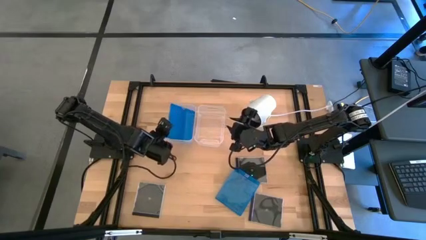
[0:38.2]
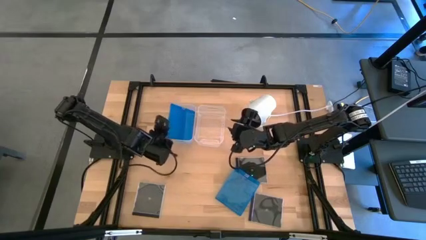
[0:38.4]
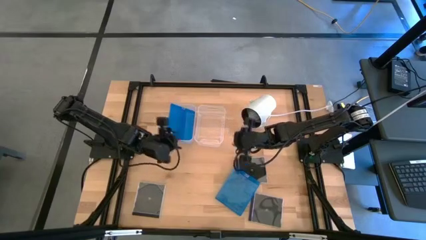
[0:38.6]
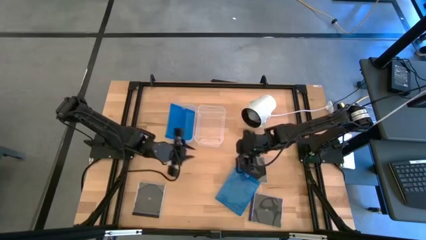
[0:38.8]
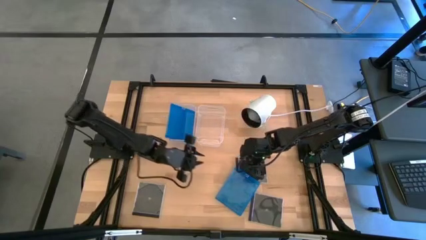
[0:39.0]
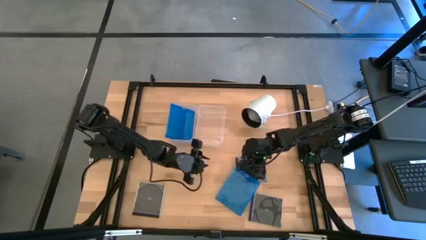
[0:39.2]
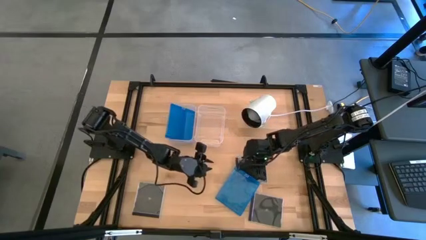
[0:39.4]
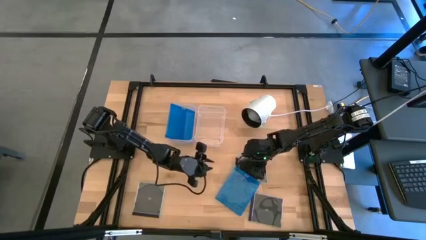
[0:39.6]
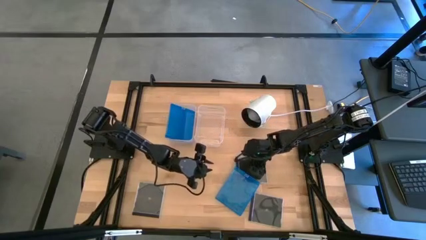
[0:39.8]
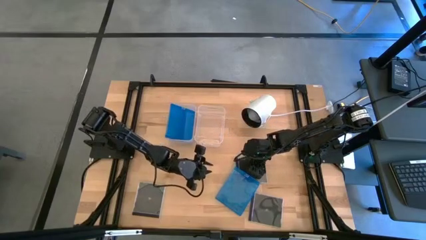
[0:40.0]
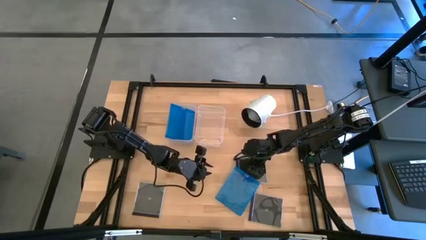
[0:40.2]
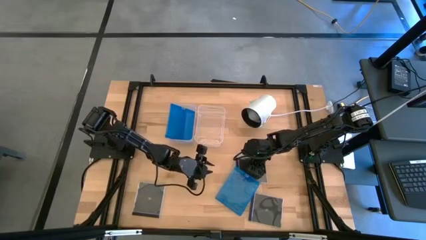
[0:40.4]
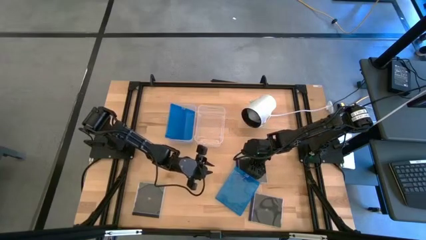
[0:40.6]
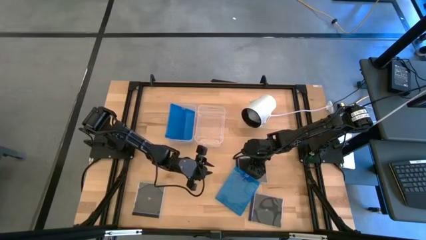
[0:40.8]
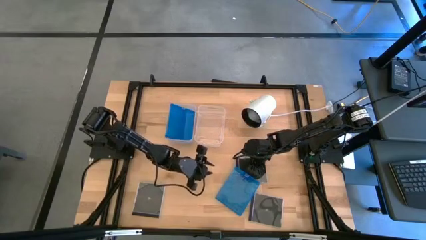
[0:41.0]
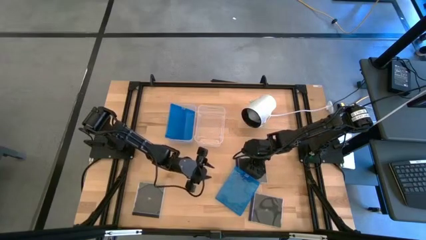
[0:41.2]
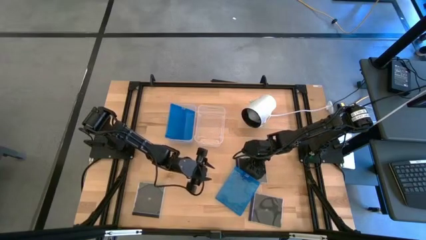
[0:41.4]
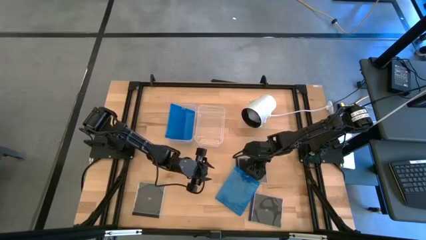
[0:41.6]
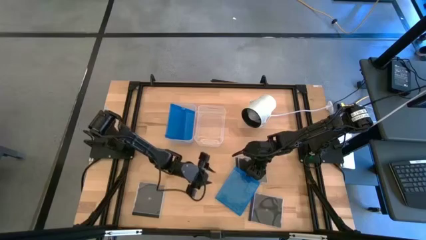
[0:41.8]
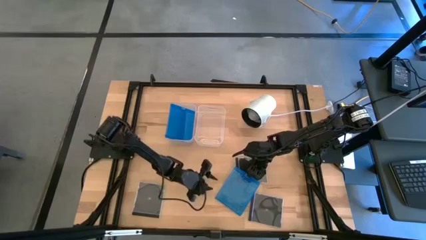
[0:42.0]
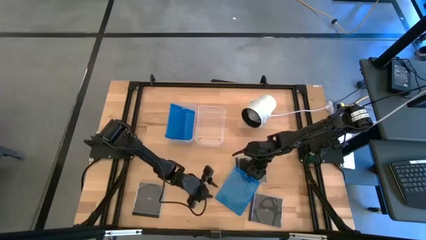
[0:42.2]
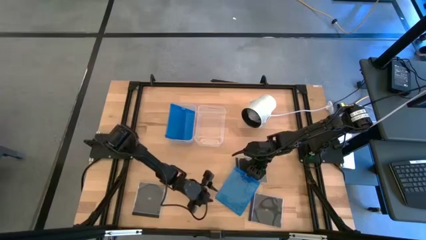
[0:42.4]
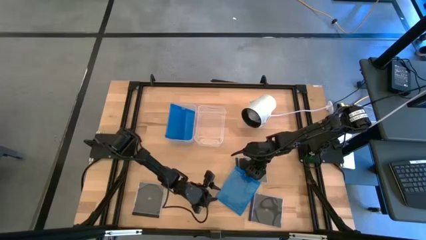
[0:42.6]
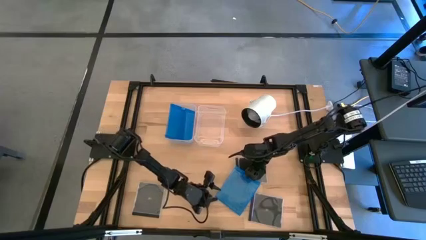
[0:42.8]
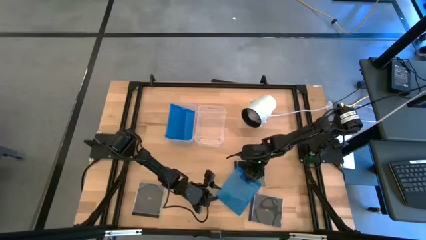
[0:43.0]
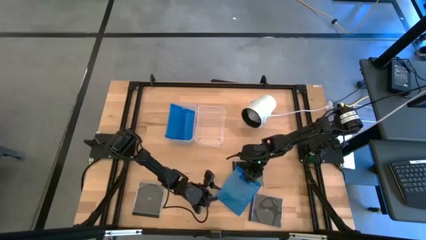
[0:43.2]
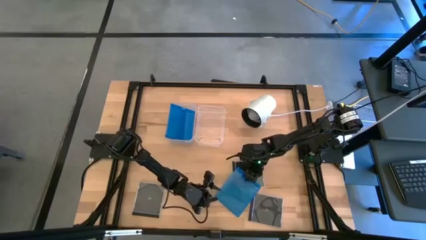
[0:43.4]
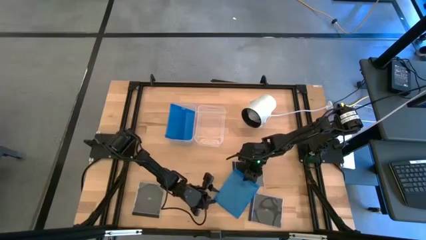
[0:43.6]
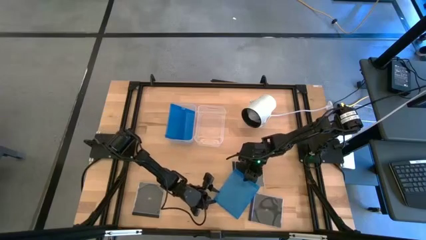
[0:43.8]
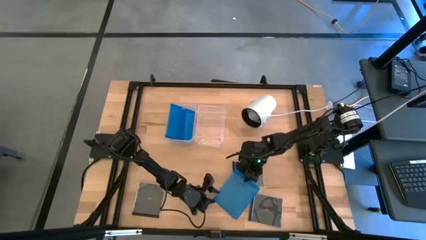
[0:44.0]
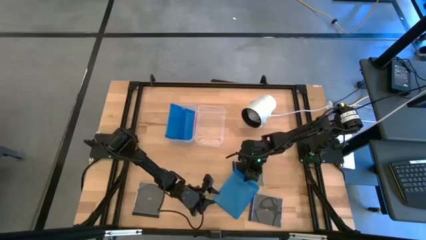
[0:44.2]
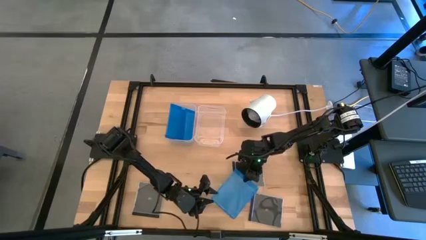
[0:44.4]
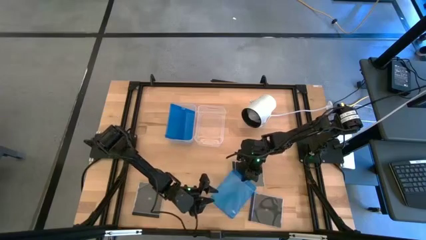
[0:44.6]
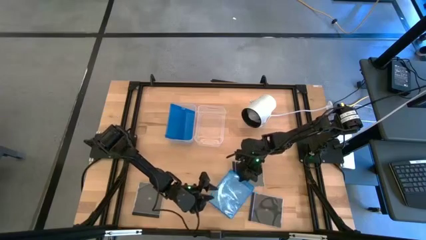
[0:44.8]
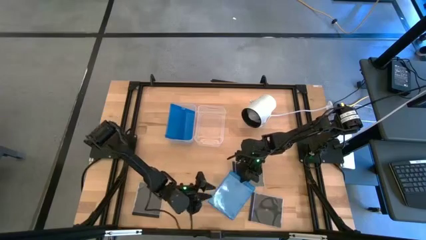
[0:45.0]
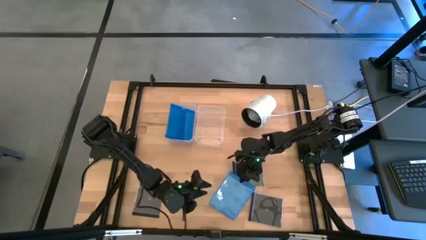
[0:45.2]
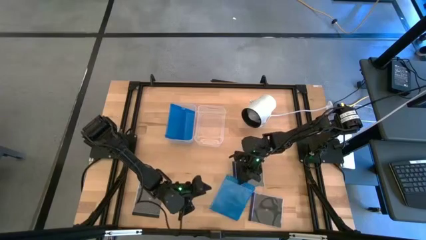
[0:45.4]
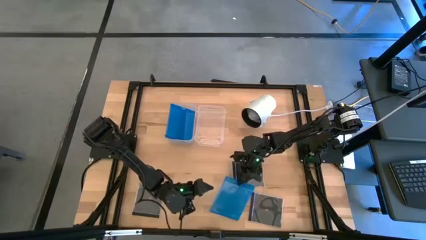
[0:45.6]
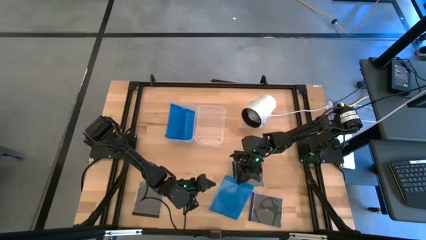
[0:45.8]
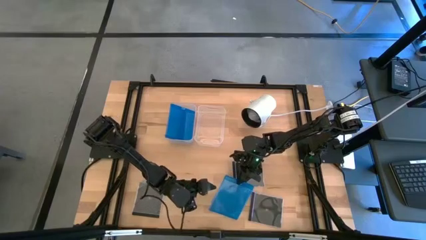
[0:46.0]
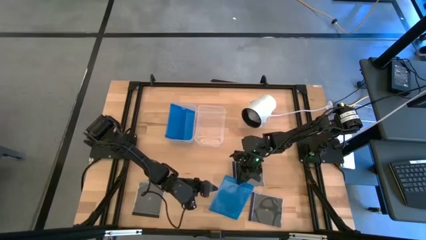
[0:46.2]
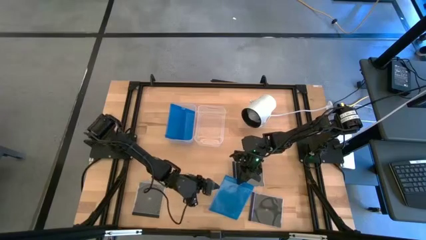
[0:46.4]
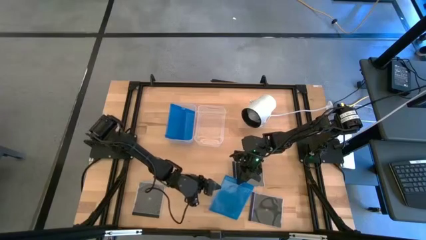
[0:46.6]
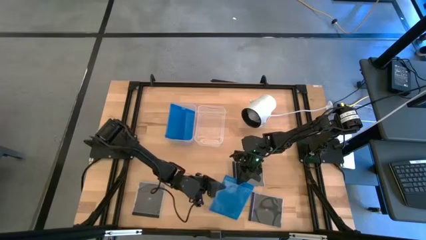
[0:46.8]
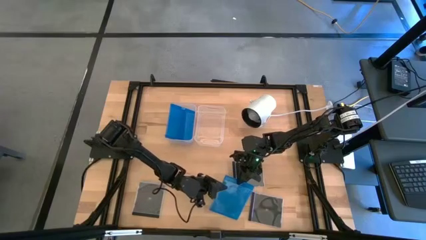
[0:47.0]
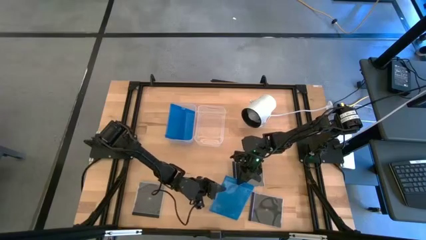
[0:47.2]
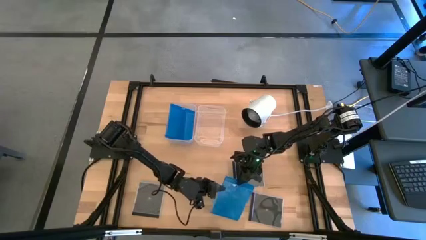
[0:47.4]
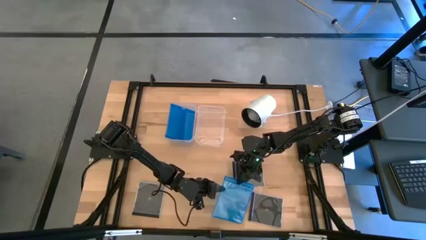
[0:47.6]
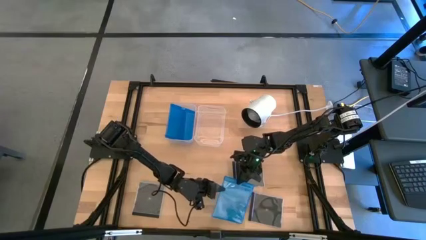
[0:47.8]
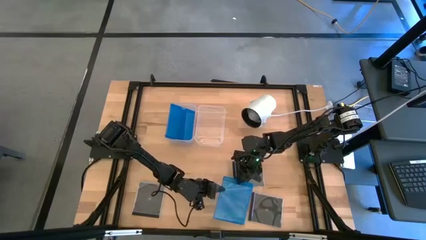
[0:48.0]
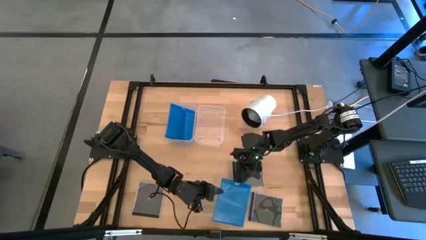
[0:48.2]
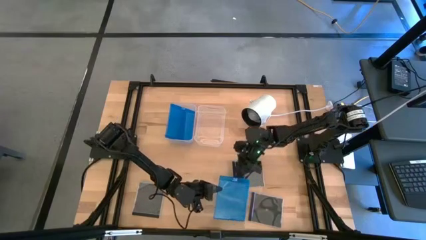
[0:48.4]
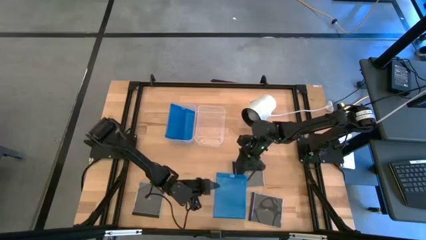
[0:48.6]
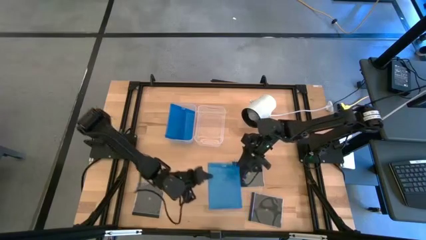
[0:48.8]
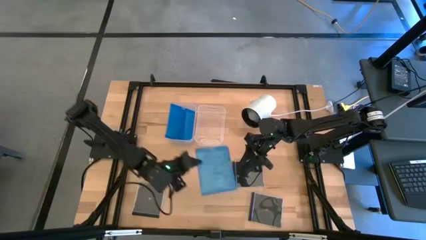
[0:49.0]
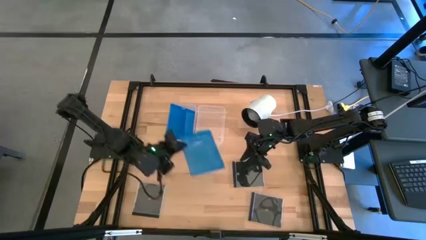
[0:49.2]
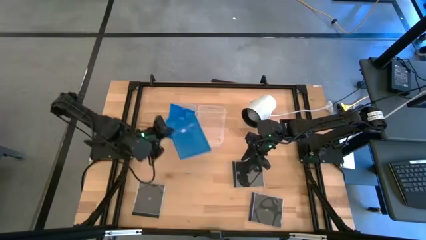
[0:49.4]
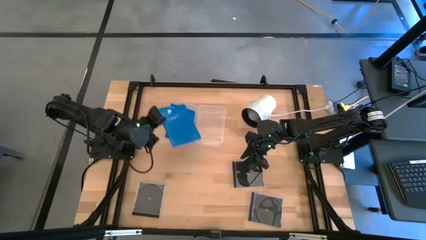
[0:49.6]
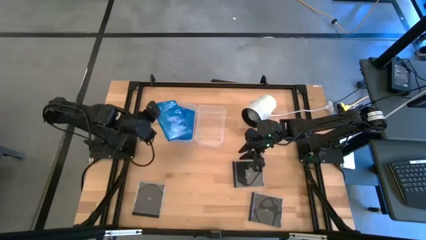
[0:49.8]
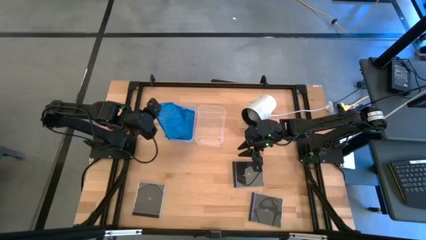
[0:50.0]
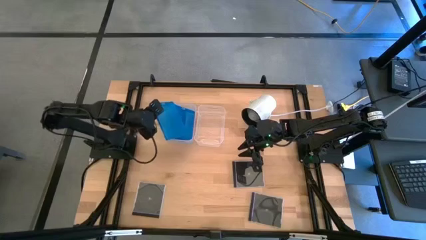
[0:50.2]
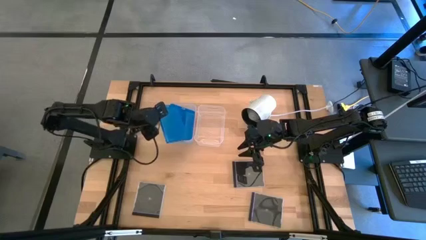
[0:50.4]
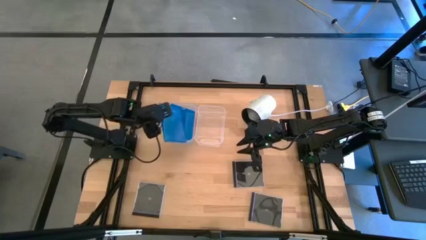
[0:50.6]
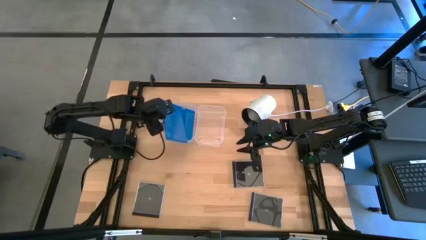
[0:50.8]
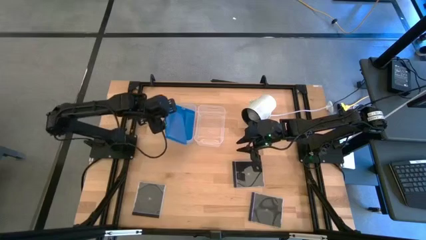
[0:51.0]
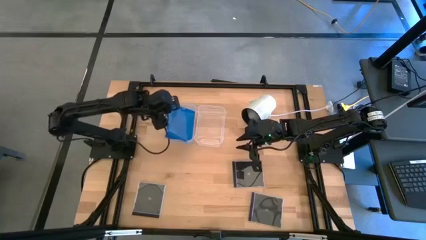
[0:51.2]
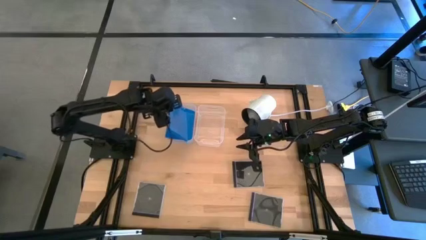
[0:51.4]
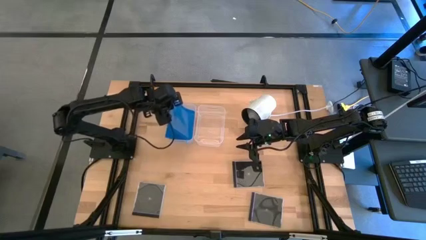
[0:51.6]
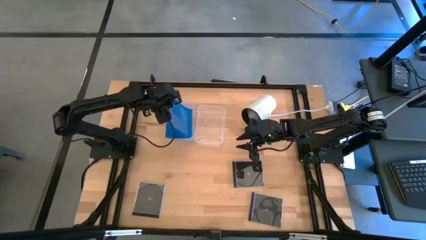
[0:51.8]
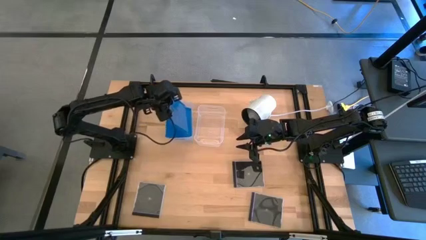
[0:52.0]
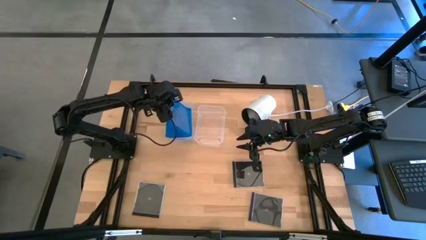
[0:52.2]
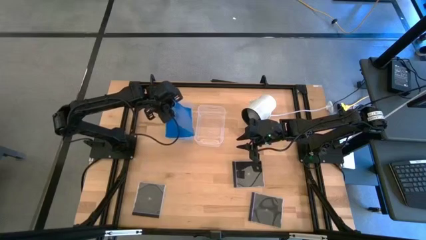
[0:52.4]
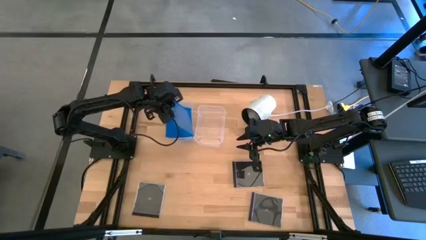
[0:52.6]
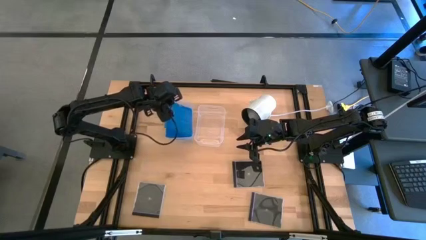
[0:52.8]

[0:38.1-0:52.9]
Task: Pick & place jewel cases by type
Put the blue cd case into the left transparent bin

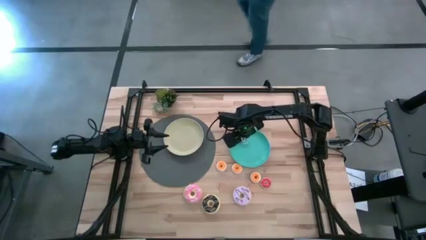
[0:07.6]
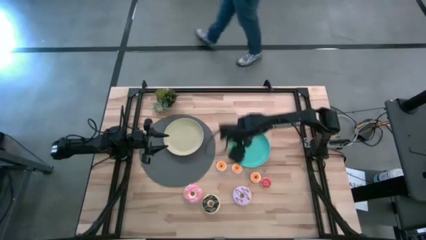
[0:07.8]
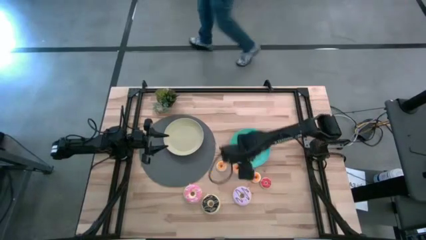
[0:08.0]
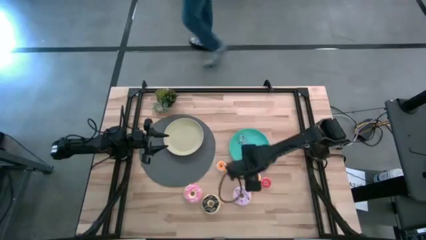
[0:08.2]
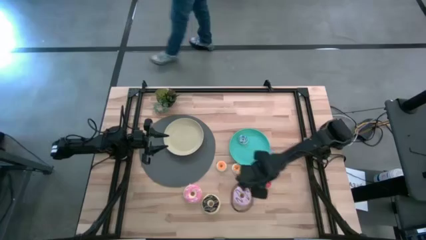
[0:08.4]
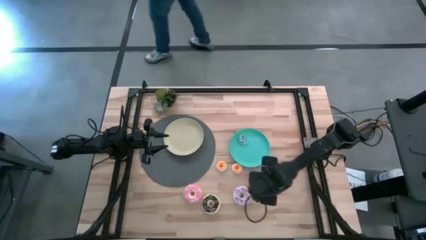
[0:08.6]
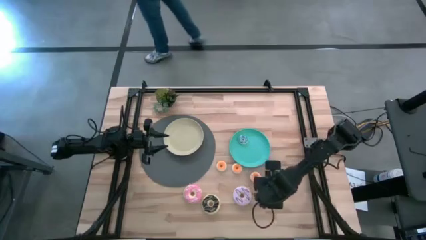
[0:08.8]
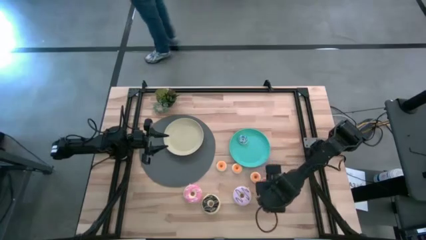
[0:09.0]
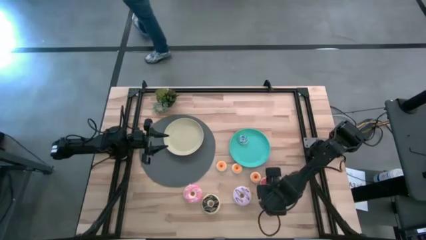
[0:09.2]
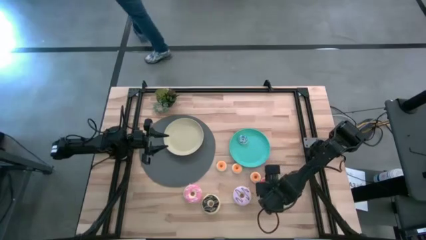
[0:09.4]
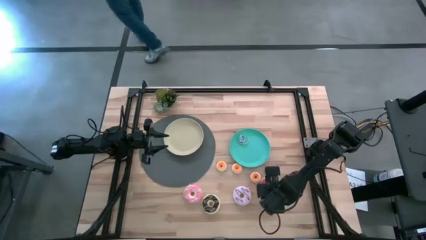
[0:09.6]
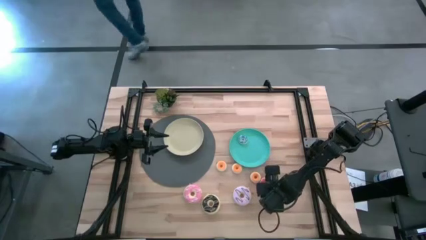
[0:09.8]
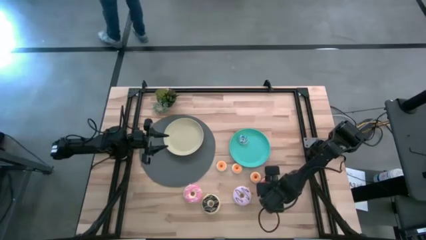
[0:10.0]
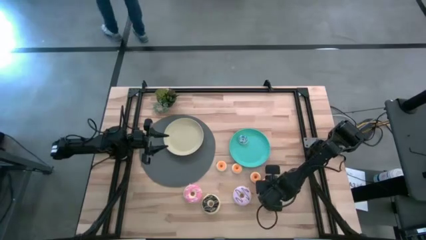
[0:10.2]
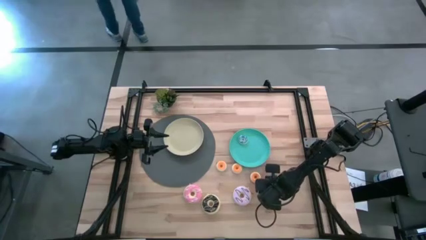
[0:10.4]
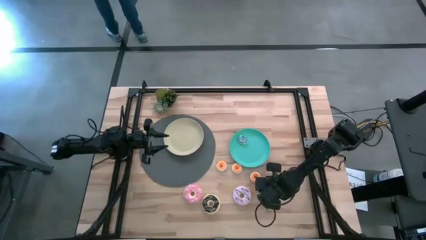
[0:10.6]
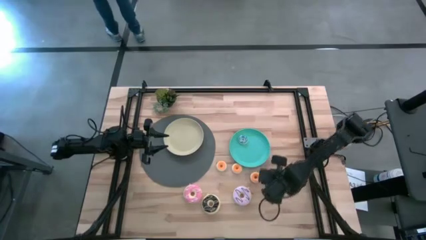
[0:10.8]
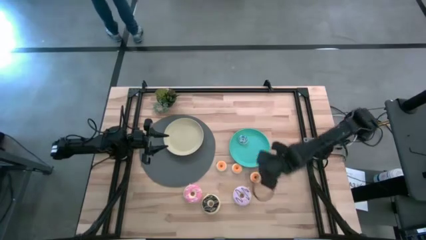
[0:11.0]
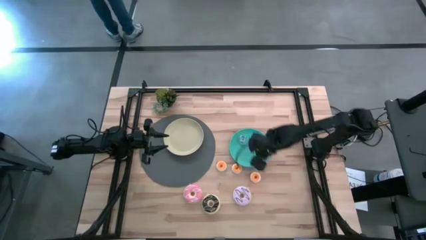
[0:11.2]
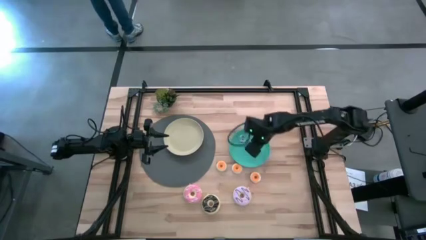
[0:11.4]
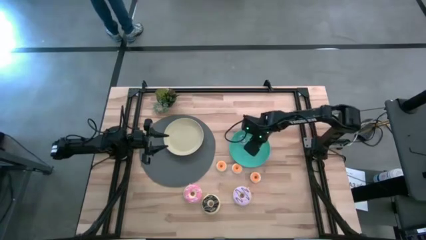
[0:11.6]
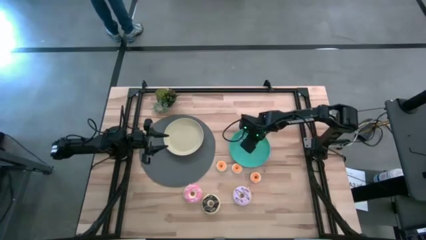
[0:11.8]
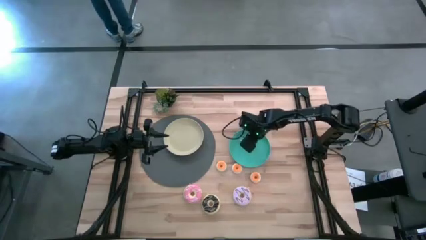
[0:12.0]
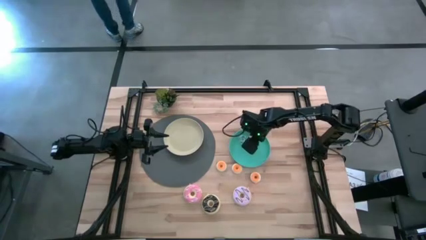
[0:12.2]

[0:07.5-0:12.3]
Task: Pick & Place donuts
Put the small orange donut on the light blue plate
